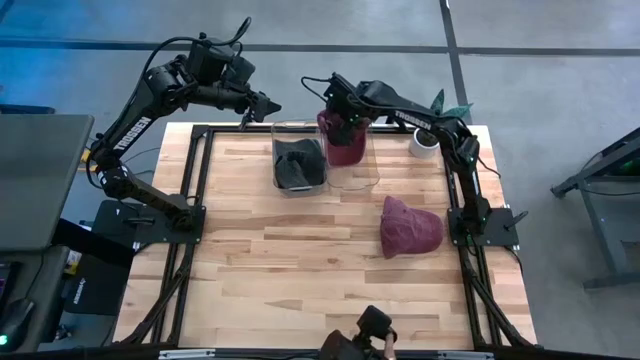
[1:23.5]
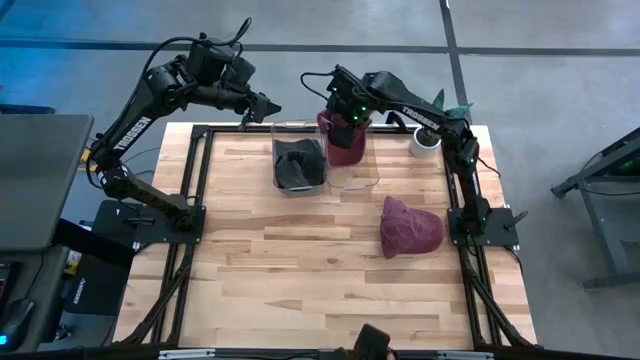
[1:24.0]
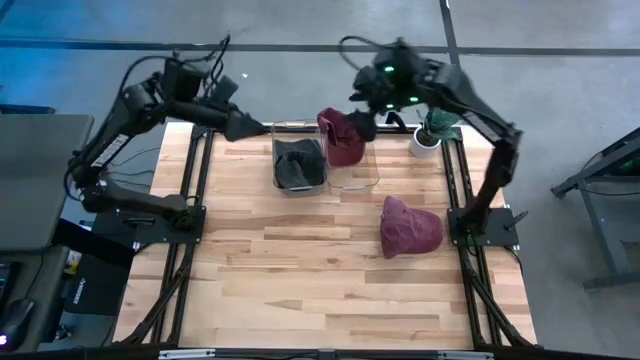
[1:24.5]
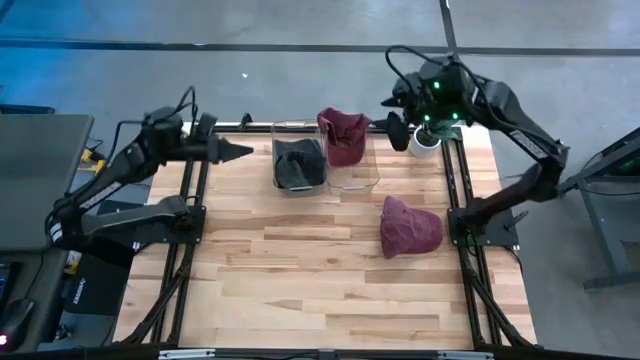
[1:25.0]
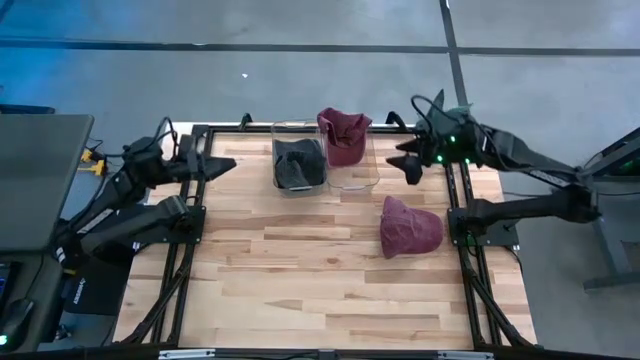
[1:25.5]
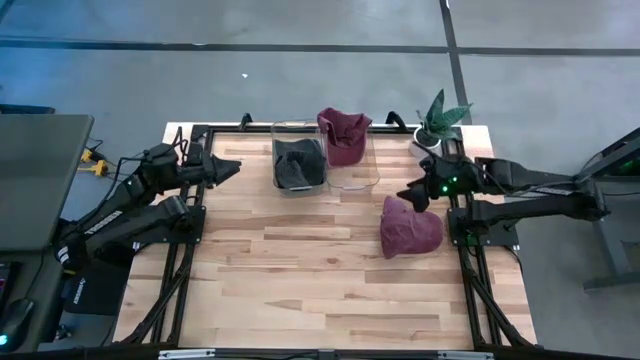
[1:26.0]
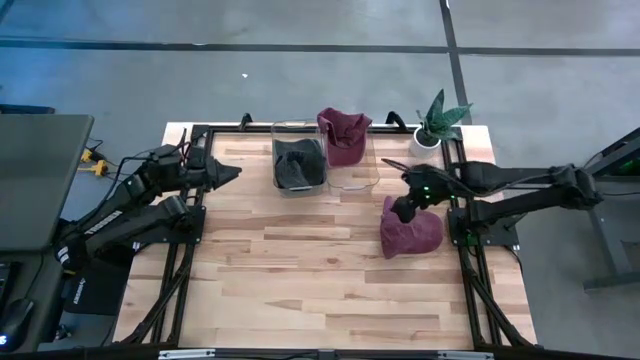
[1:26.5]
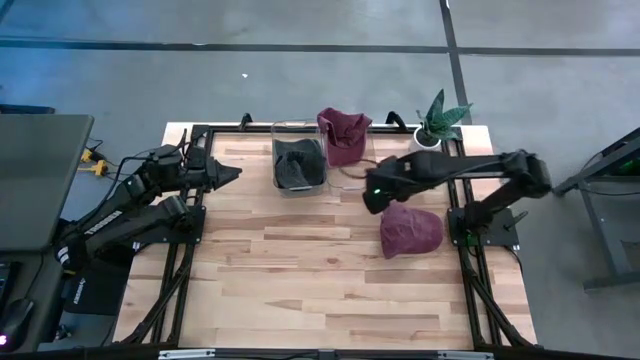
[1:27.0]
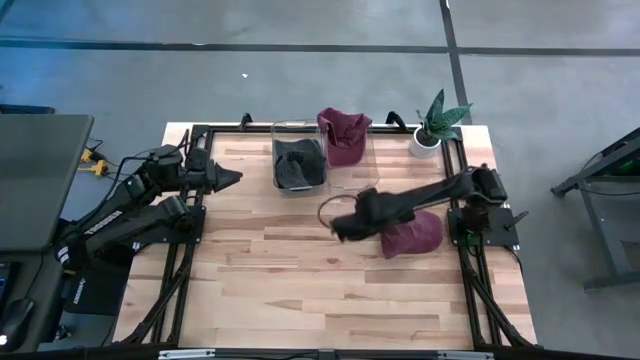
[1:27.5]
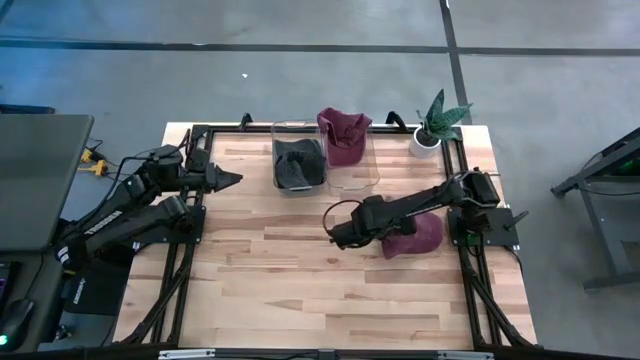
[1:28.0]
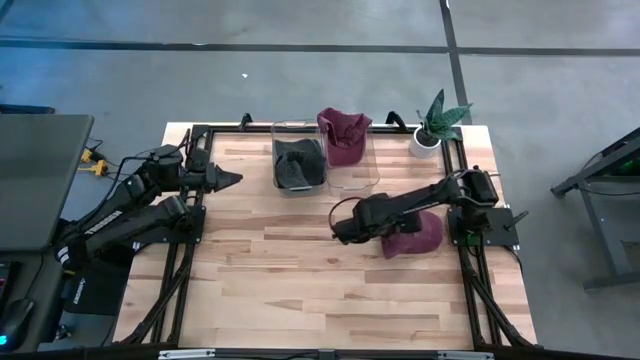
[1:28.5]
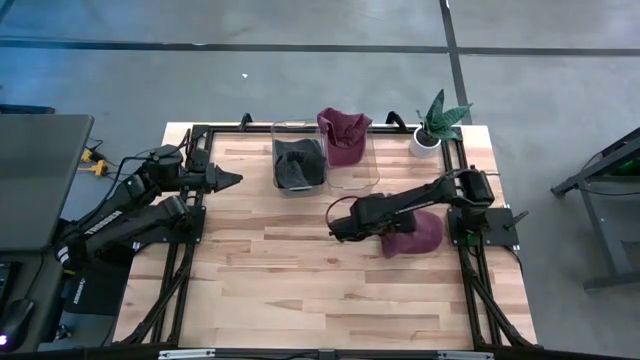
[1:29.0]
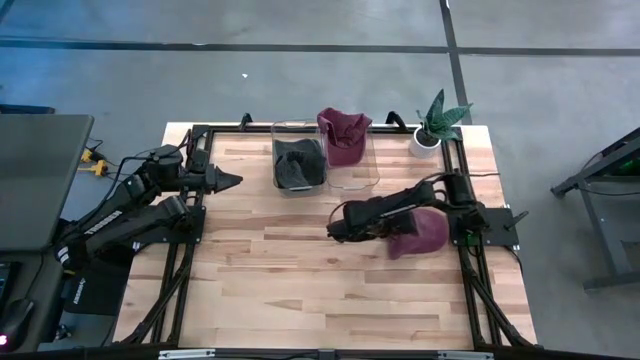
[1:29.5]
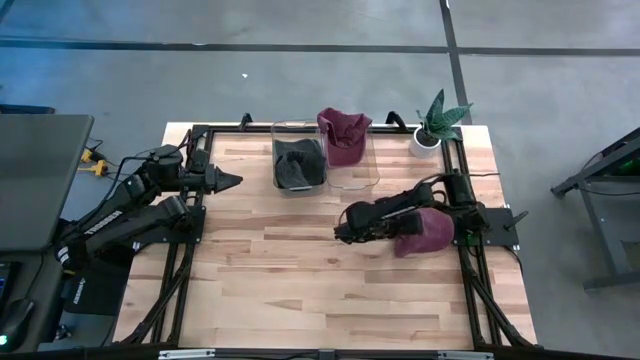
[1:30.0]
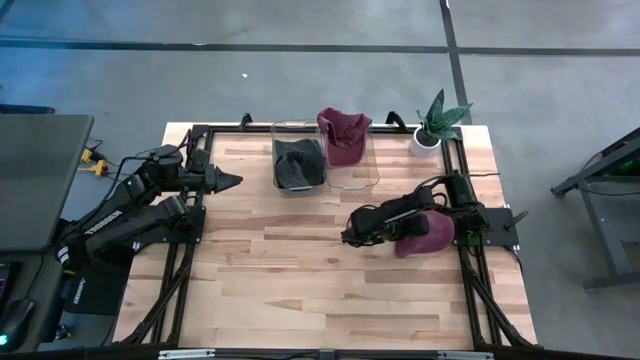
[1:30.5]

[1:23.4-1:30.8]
Task: Pick & Place hat
Put the red cap into the right transparent bin

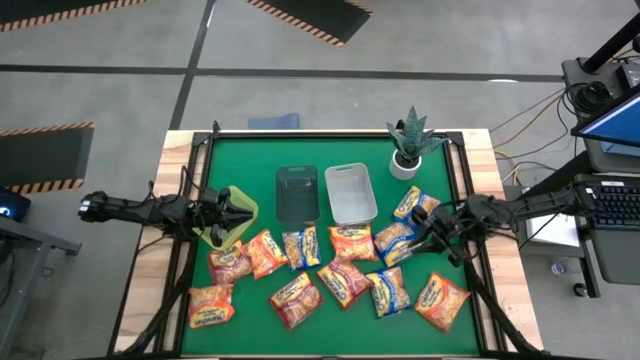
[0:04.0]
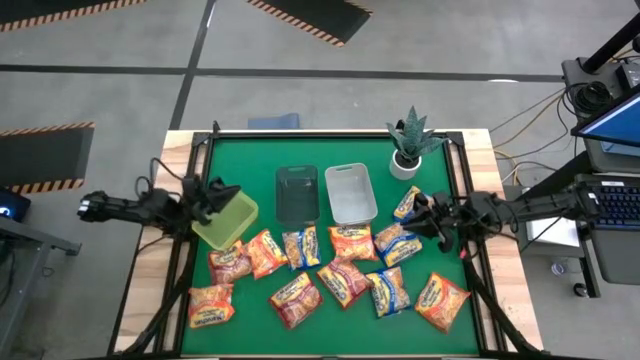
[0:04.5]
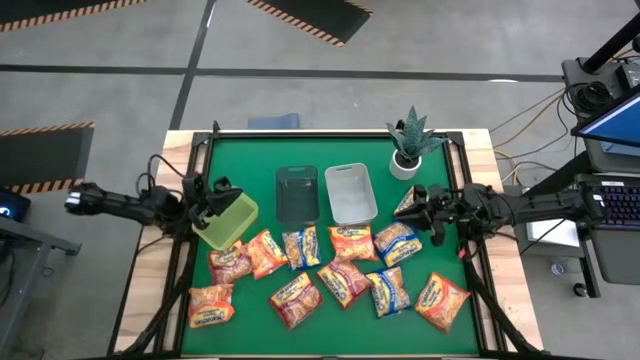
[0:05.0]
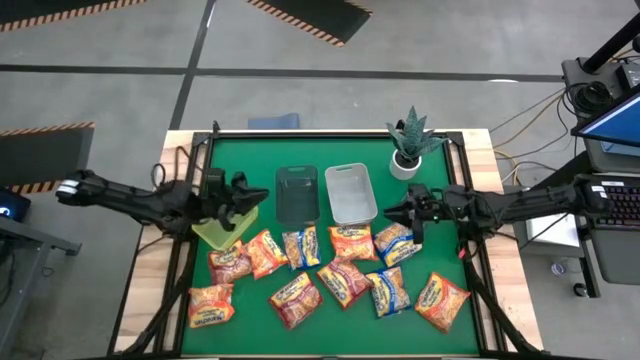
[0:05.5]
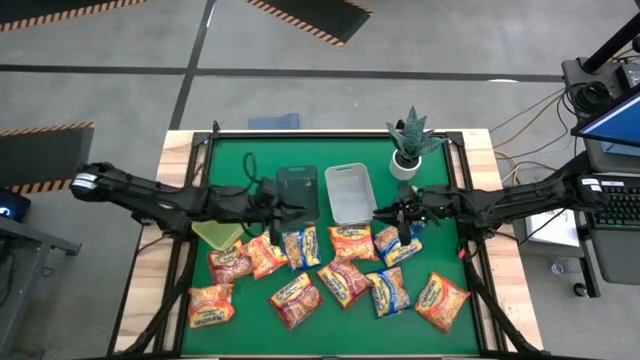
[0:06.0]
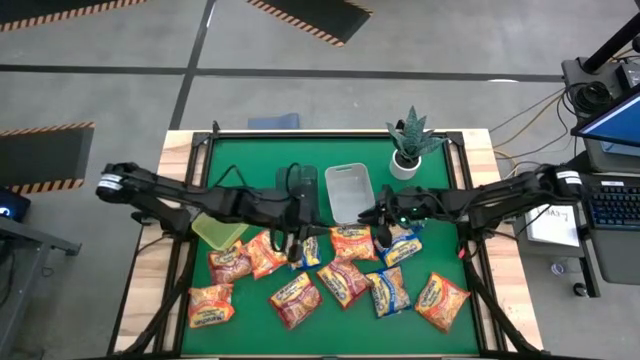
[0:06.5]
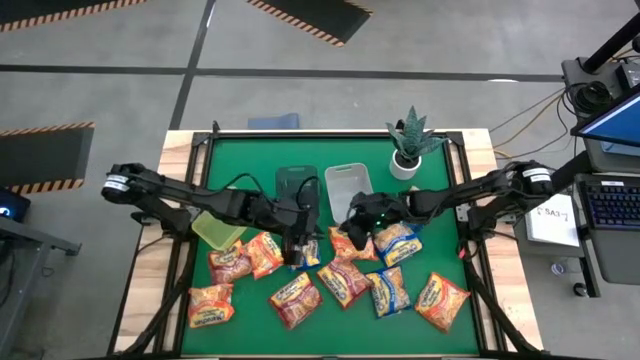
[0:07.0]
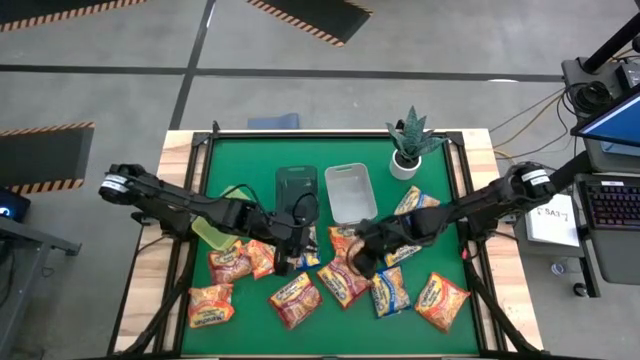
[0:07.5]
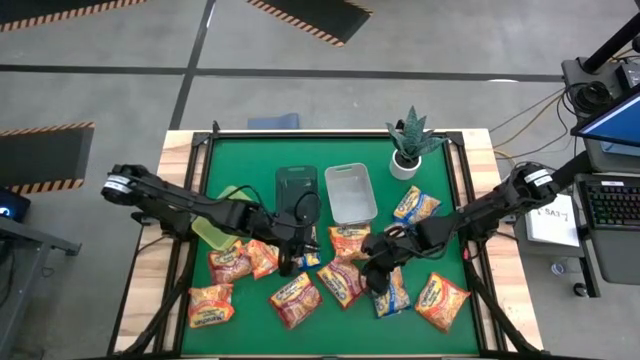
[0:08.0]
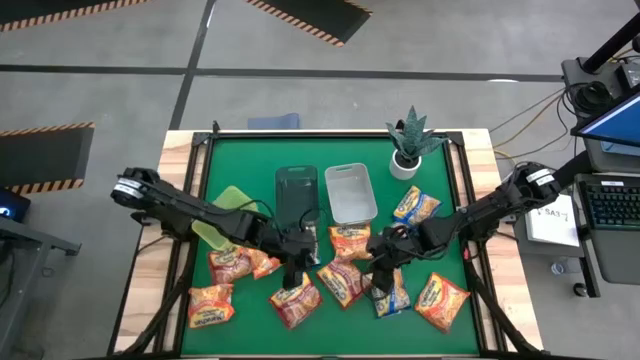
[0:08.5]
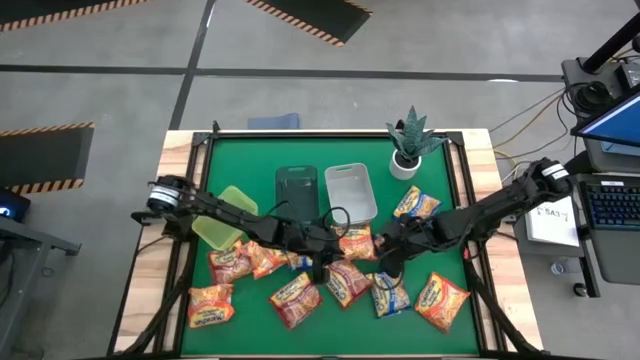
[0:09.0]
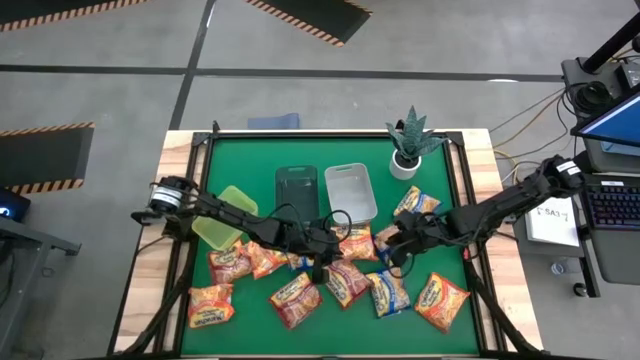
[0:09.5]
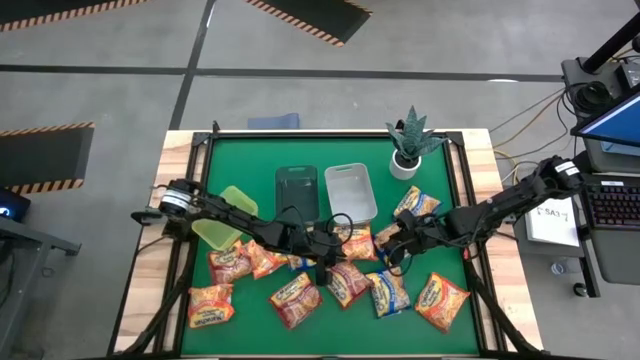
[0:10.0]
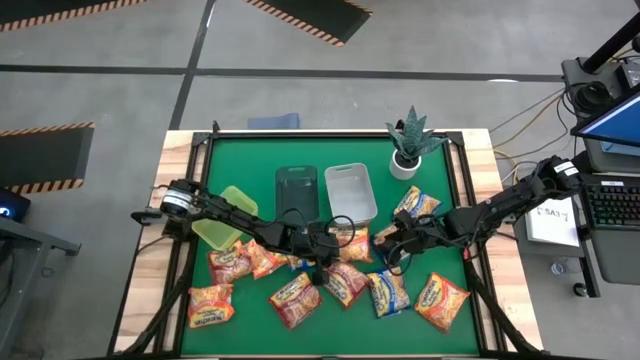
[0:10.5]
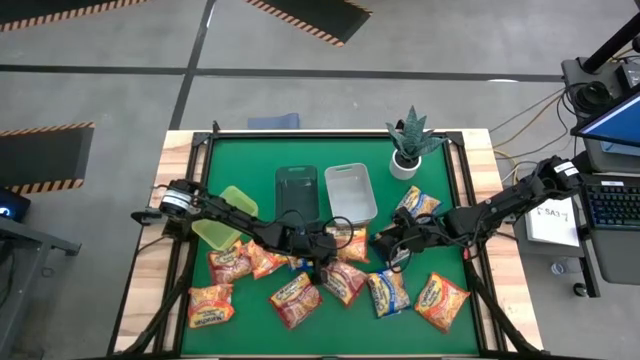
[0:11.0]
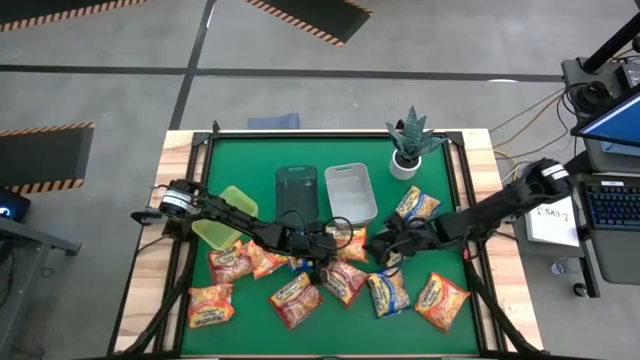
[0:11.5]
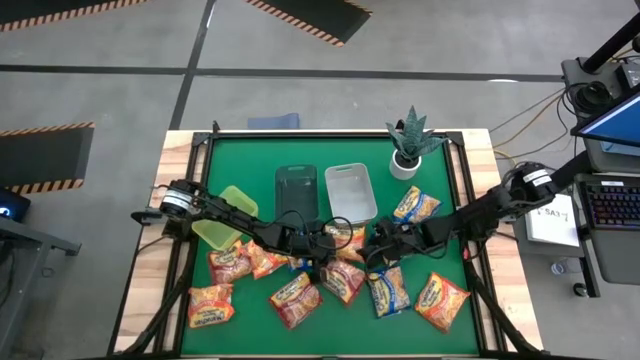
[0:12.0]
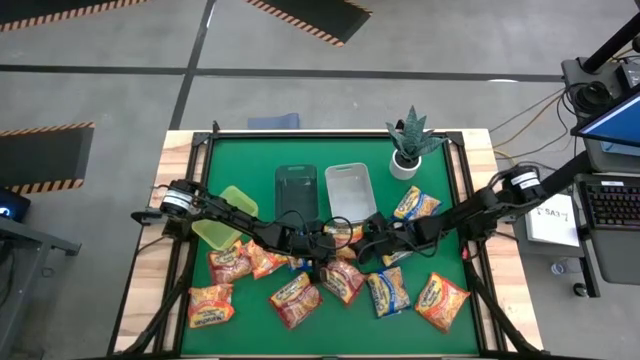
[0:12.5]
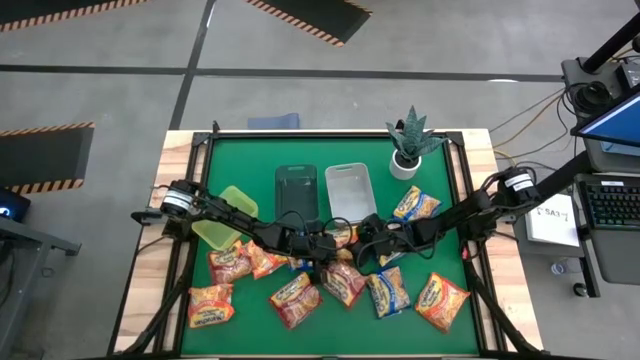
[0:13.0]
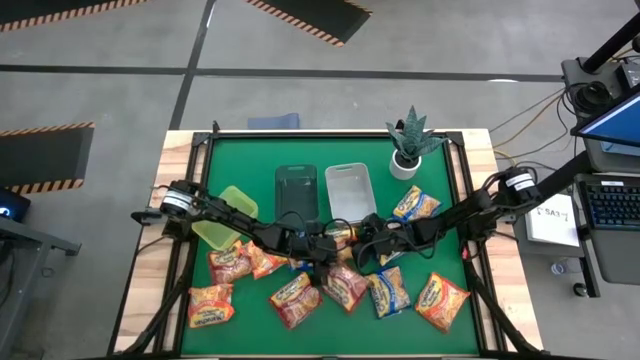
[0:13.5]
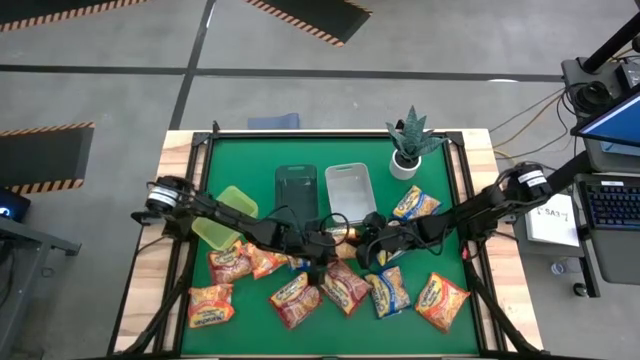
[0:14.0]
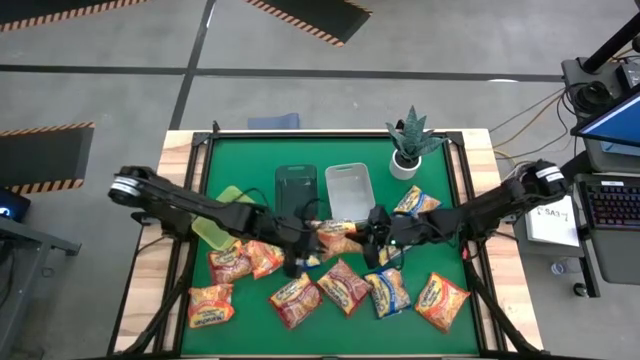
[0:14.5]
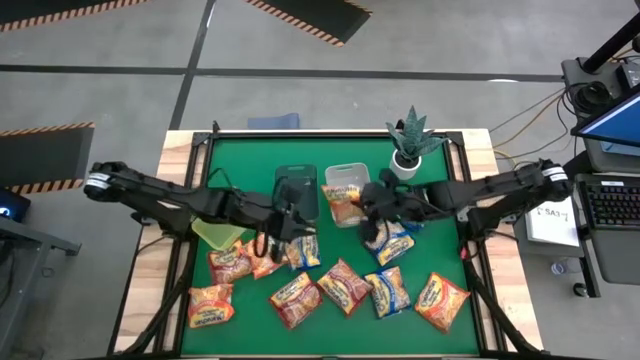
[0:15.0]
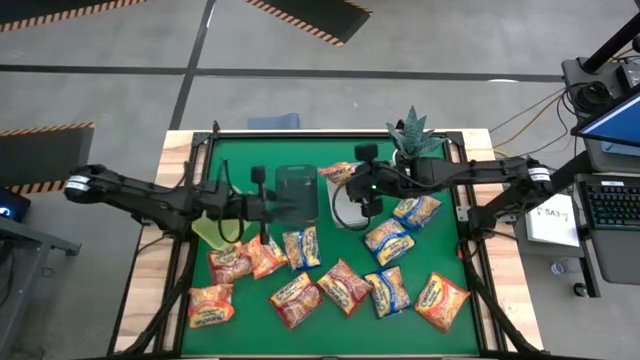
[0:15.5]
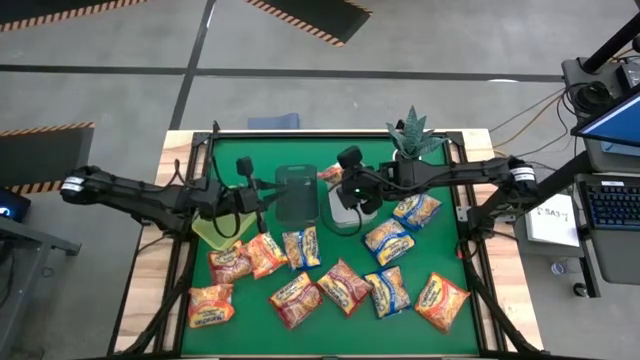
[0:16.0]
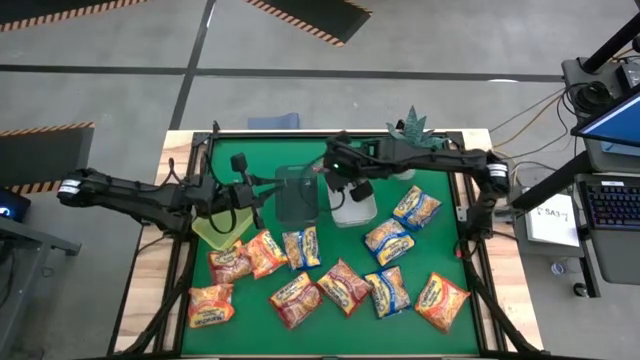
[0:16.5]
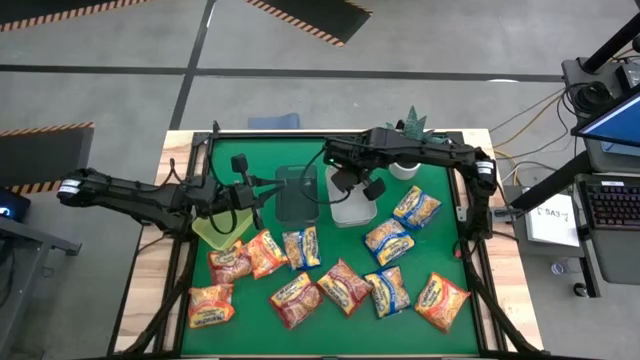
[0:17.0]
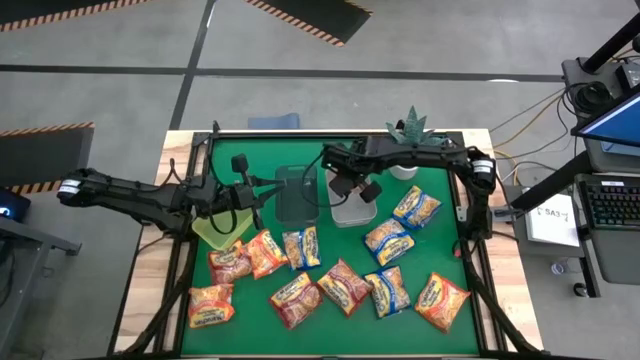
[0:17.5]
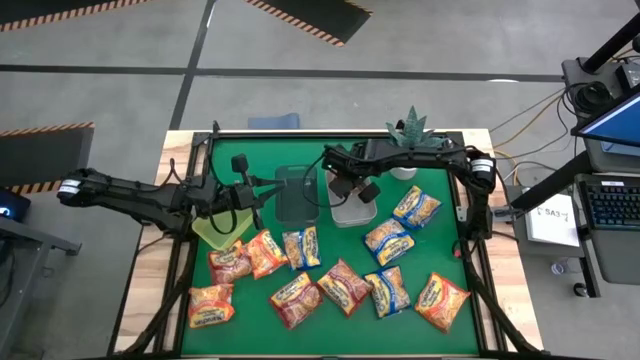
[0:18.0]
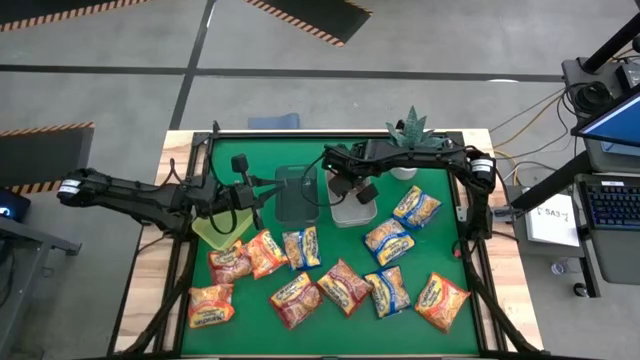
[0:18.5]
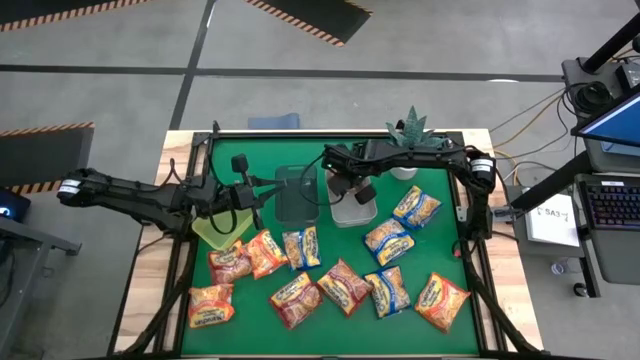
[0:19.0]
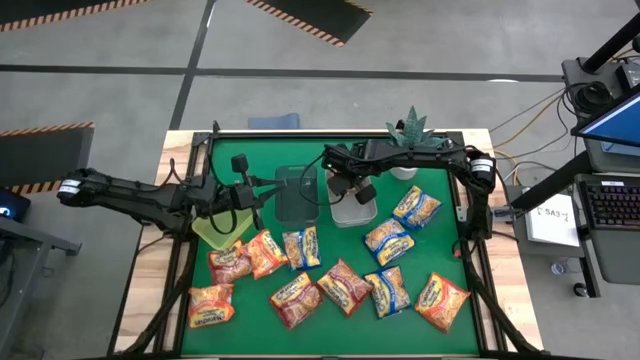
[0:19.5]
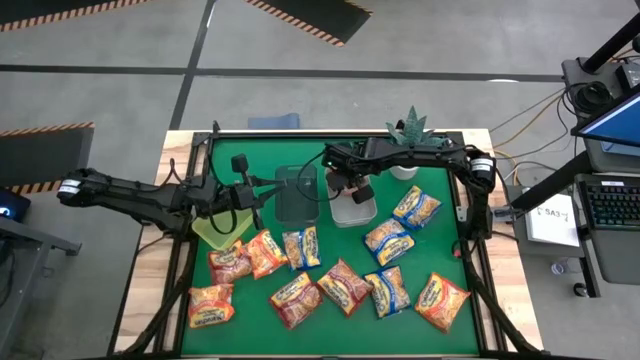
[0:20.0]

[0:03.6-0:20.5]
Task: Sort Maruchan noodles
Put the orange noodle pack into the gray bin
